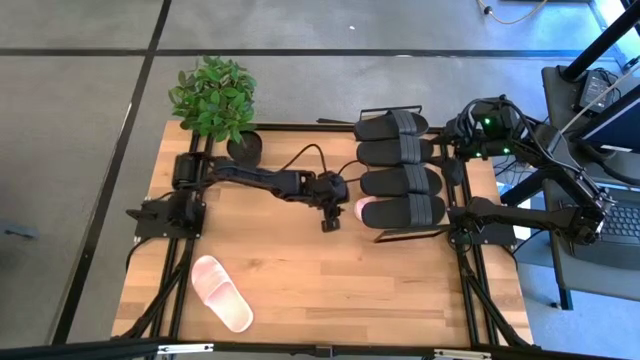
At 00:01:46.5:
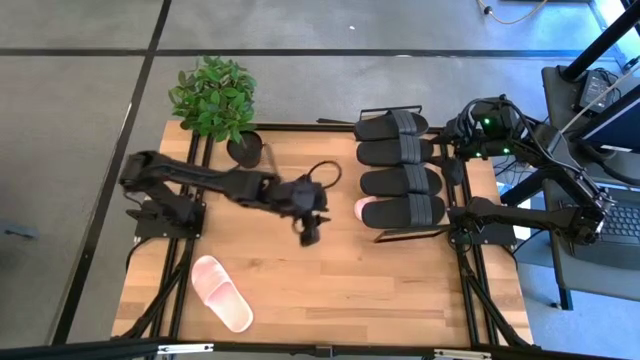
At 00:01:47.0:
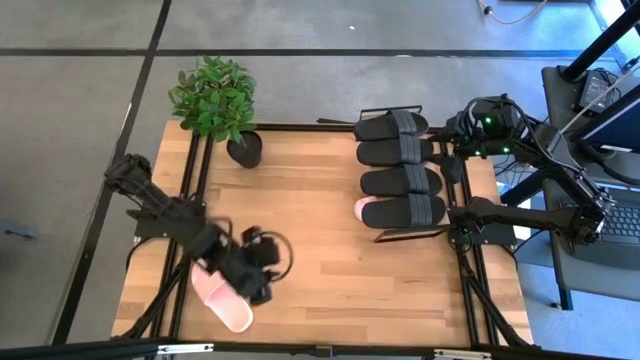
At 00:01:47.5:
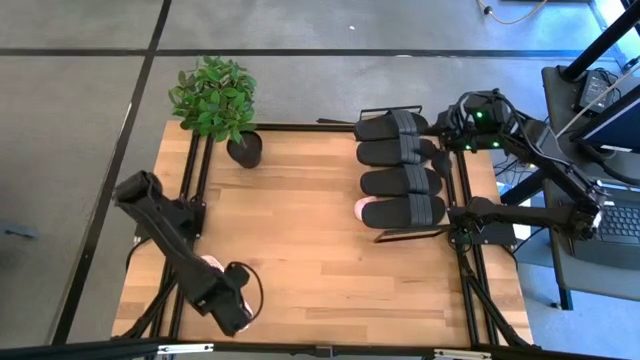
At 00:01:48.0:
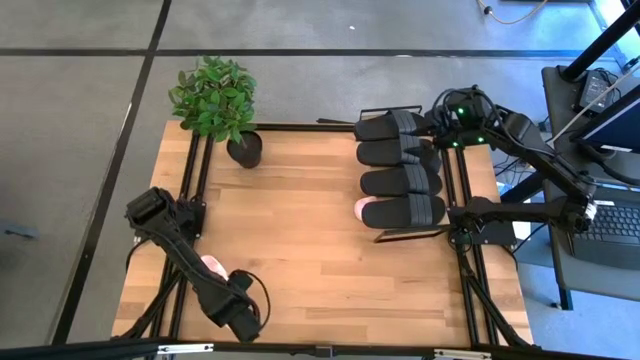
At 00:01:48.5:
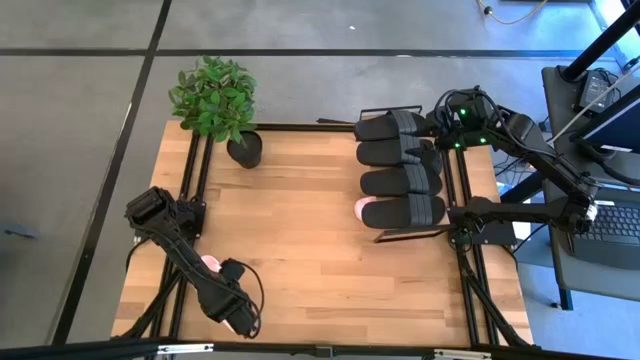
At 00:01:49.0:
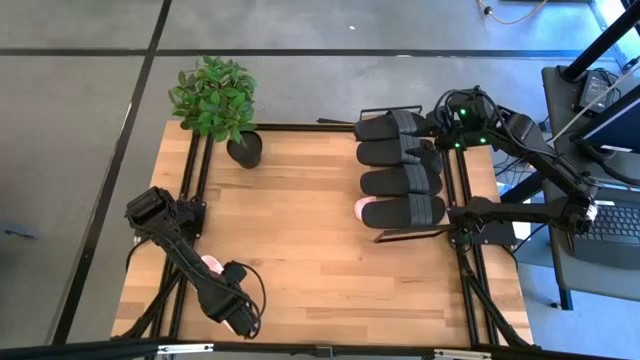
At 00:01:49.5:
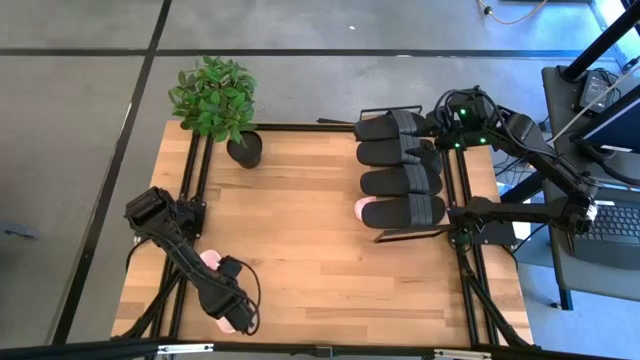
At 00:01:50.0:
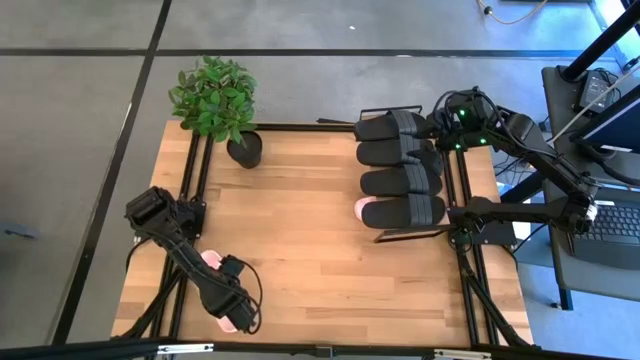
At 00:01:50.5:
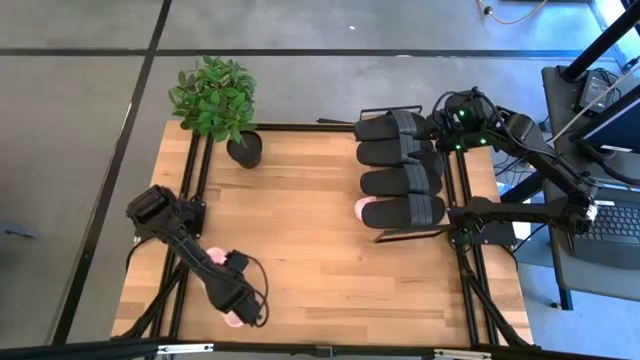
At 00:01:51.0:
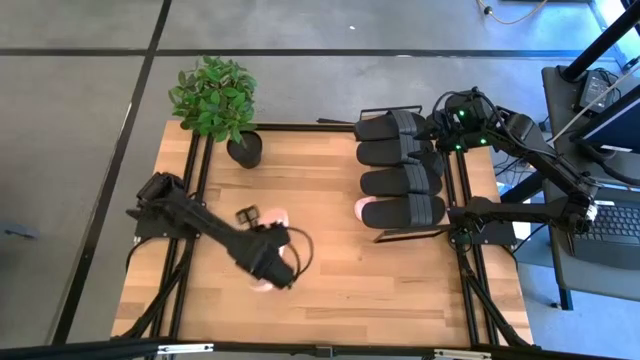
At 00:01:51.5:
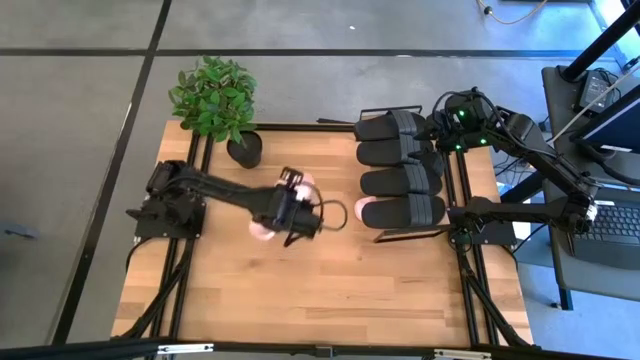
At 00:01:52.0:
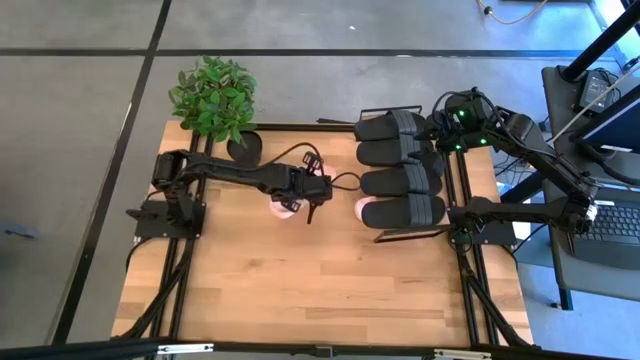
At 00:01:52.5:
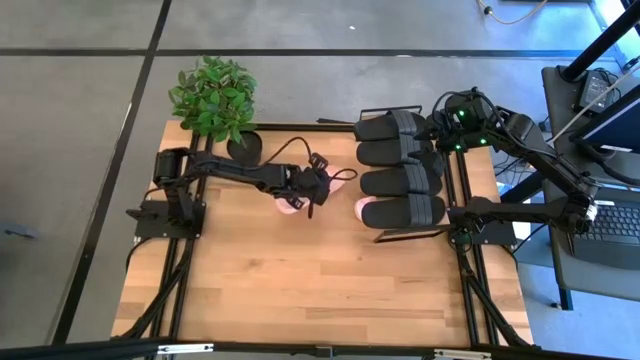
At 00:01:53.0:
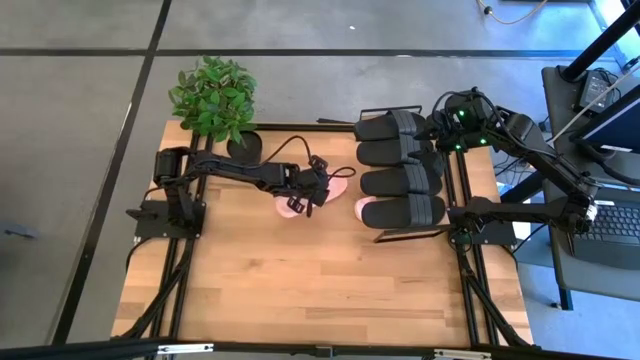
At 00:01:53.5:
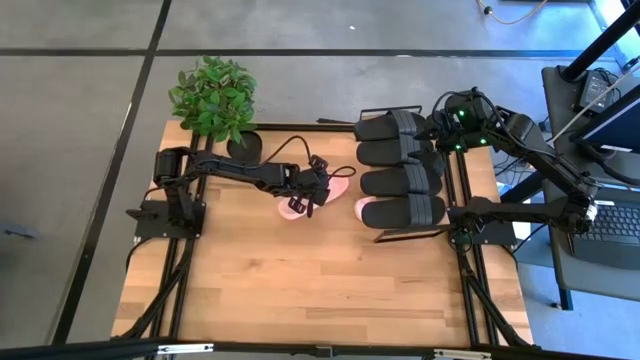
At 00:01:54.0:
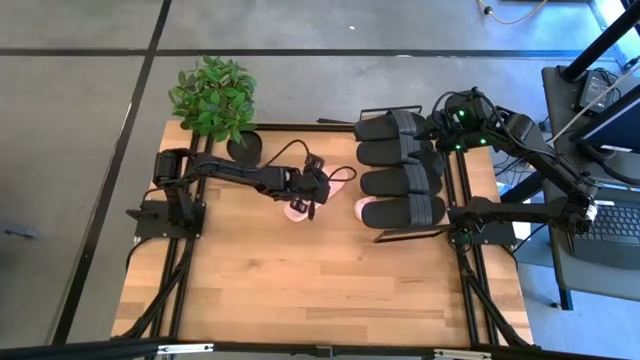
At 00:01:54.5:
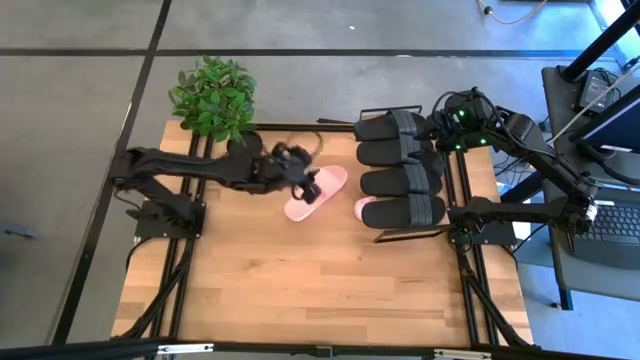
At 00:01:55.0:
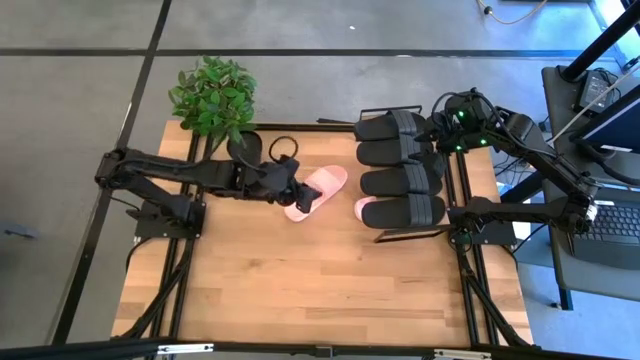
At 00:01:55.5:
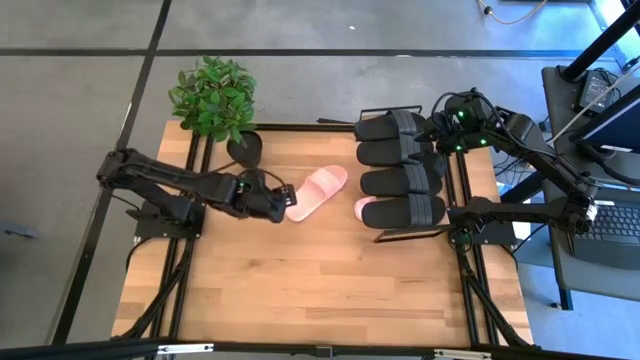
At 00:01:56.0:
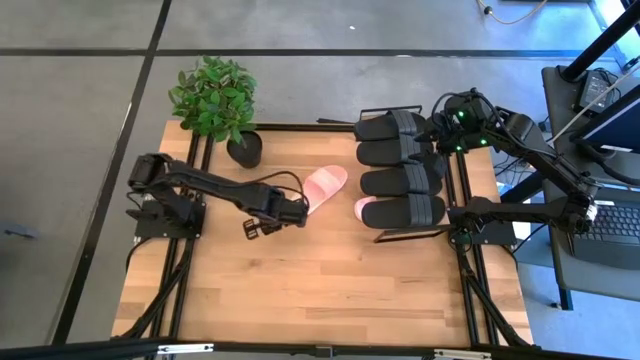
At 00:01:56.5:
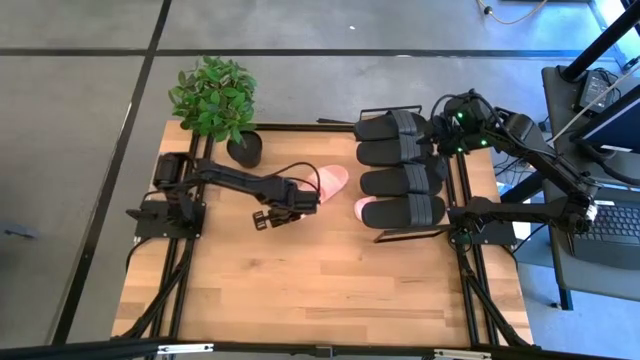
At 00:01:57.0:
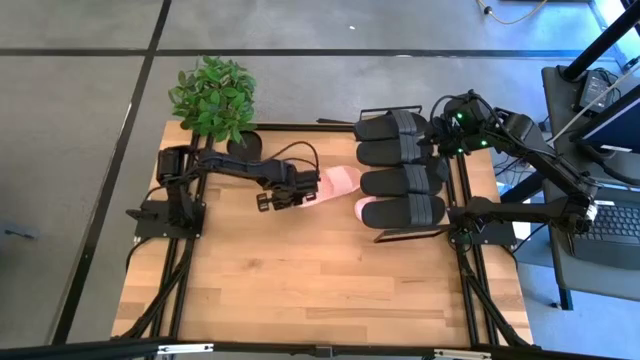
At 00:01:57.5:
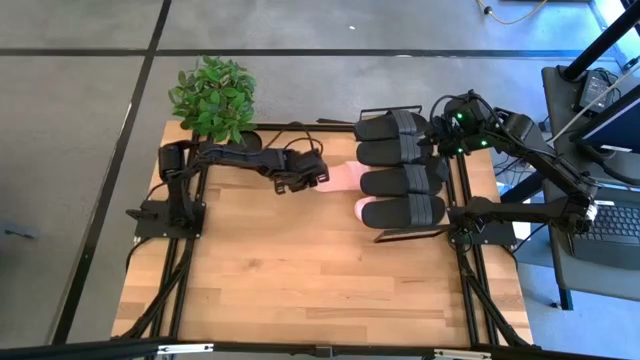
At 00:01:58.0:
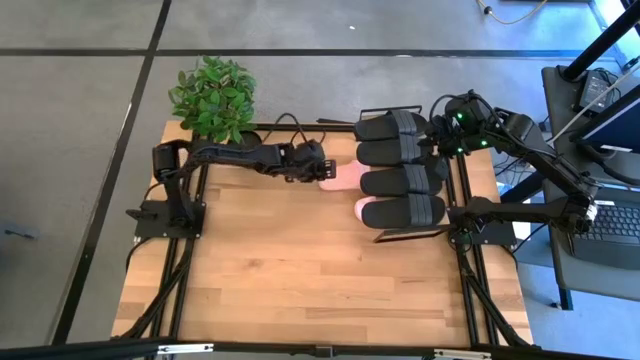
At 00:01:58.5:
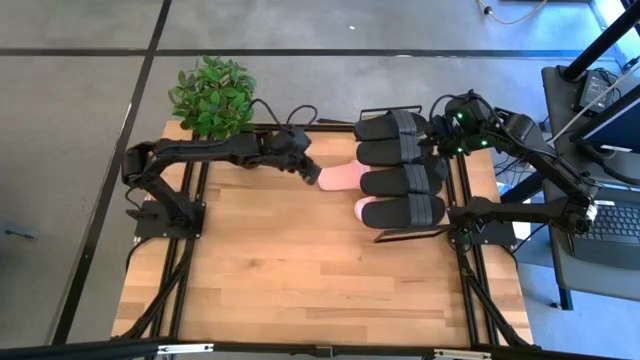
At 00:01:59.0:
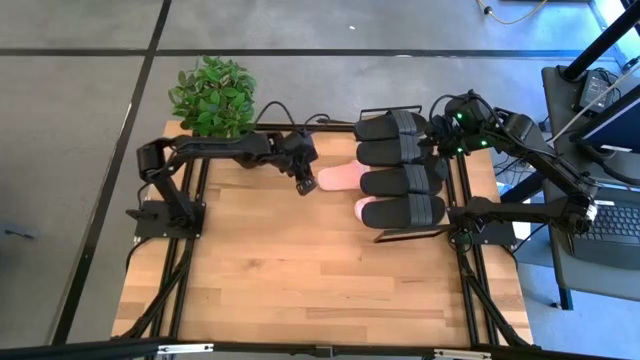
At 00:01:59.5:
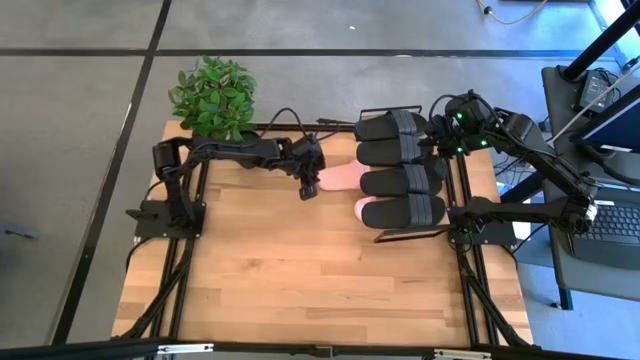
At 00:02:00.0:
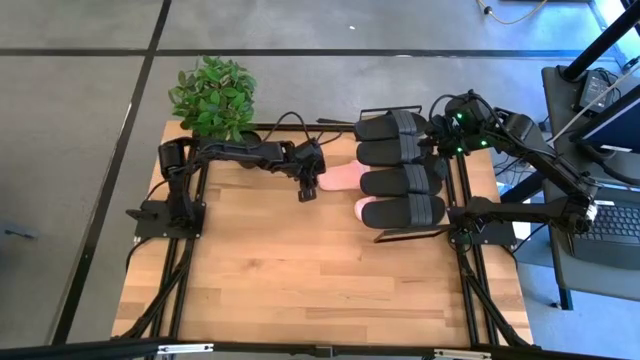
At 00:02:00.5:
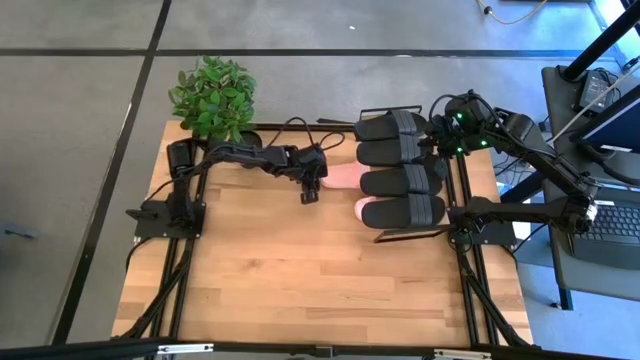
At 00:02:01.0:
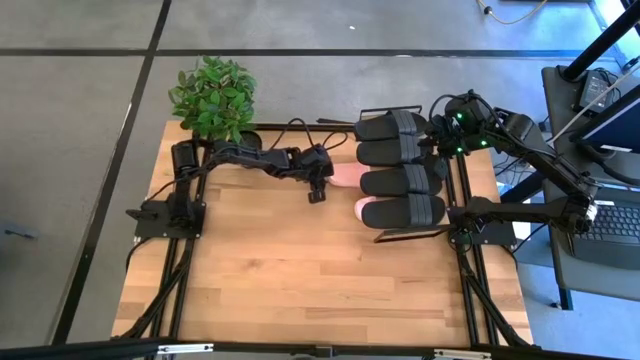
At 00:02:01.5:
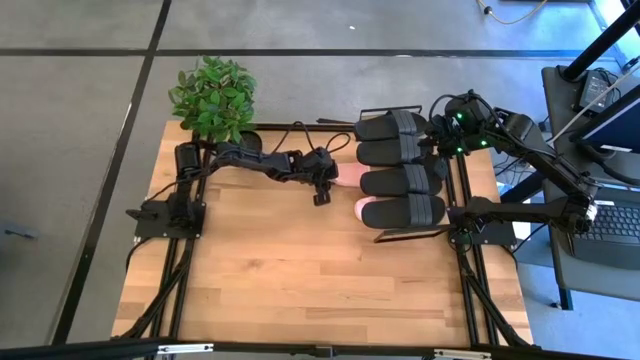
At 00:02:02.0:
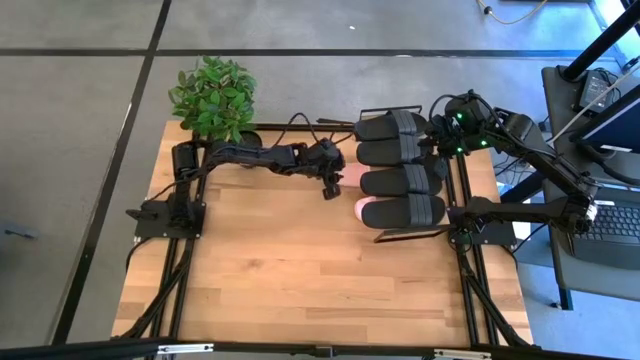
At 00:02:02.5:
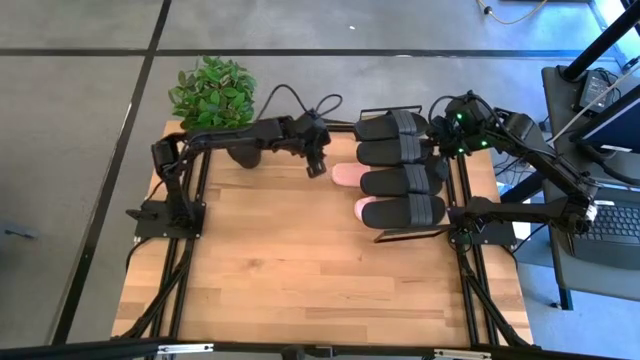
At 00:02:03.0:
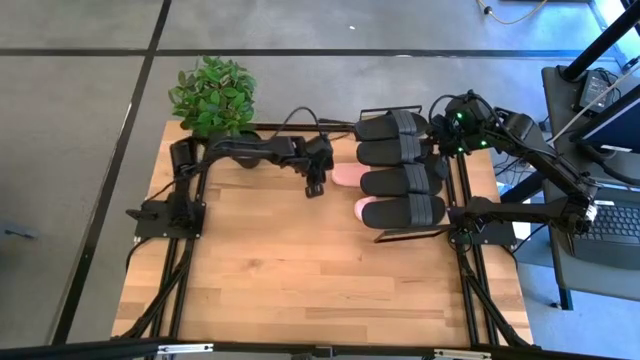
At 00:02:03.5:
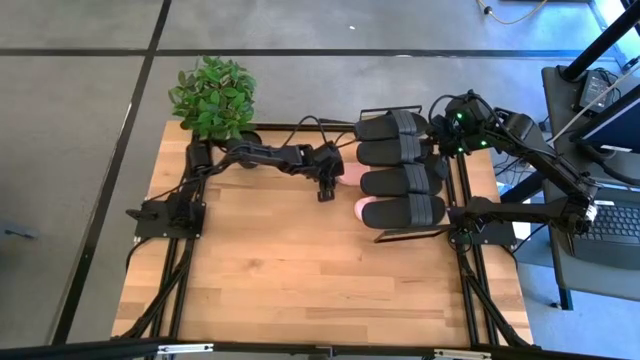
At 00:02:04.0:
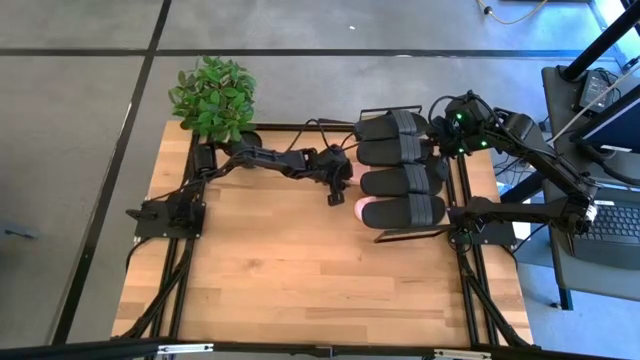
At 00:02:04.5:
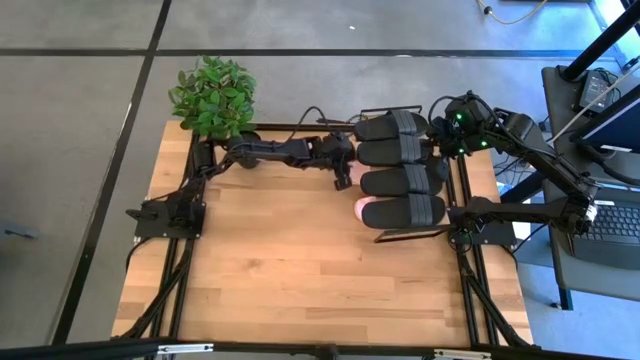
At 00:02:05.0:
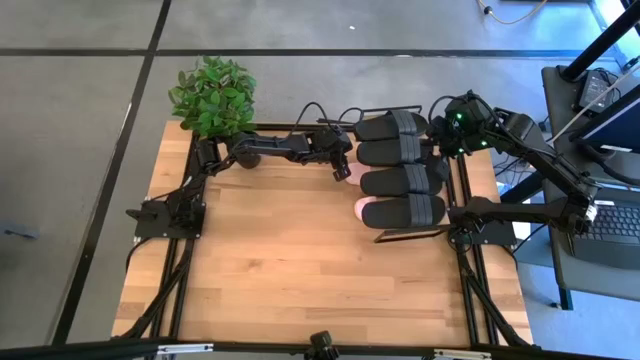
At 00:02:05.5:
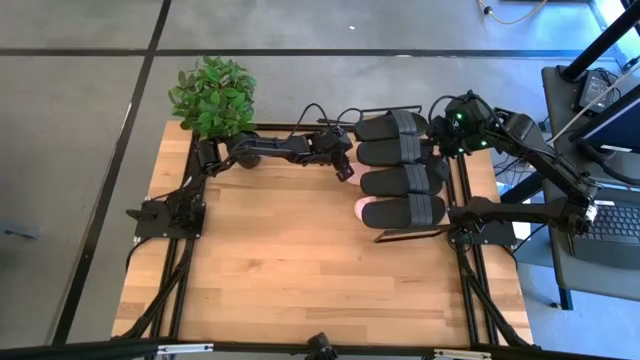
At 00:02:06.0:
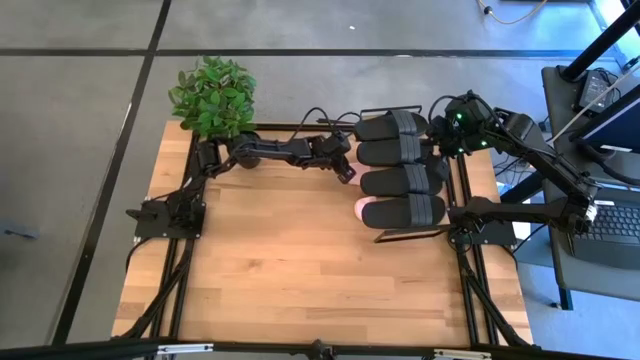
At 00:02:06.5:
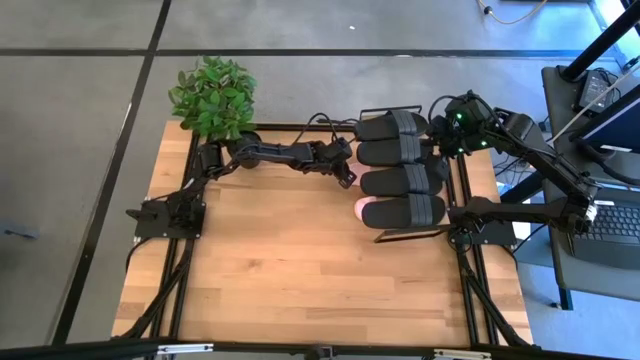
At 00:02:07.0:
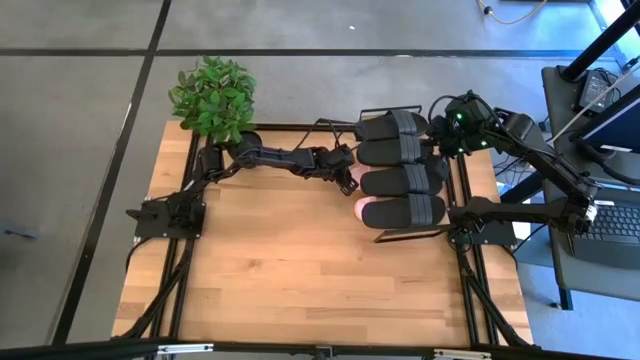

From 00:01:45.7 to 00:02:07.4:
Task: Pick and place slides into the shelf
Put the pink slide under the shelf
